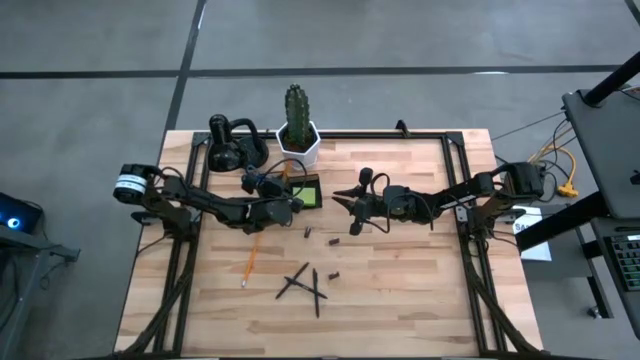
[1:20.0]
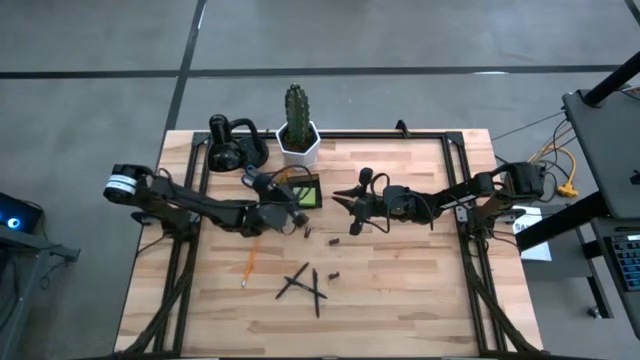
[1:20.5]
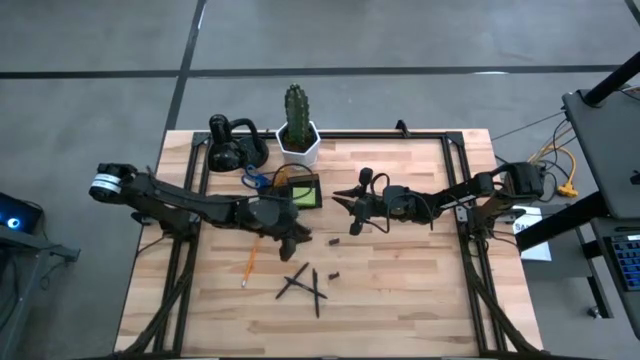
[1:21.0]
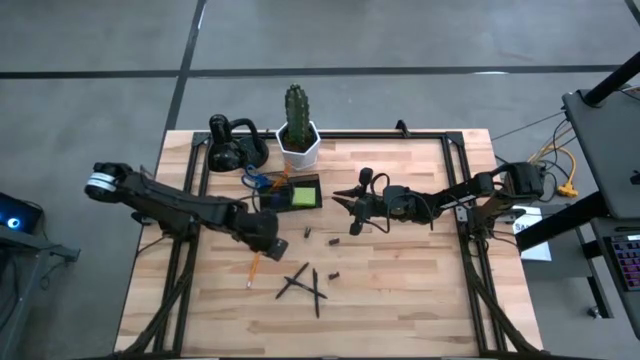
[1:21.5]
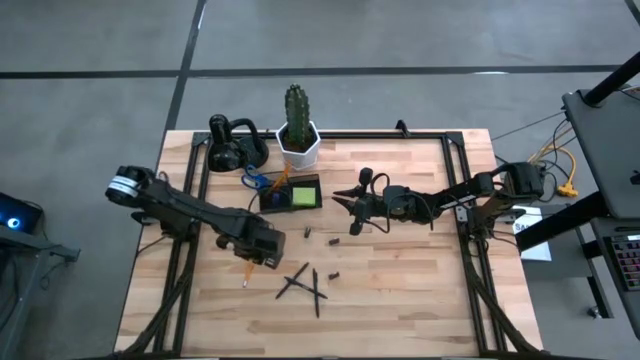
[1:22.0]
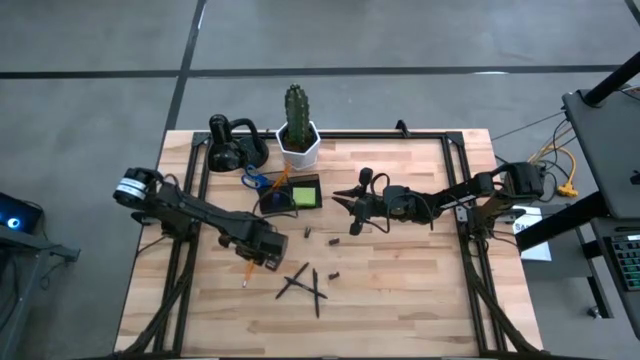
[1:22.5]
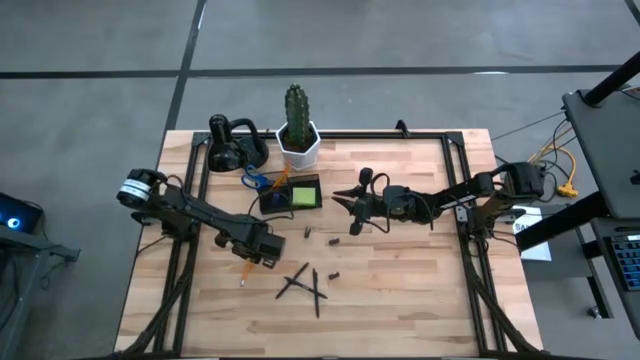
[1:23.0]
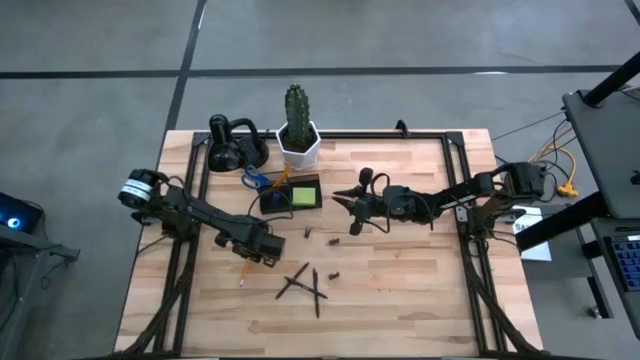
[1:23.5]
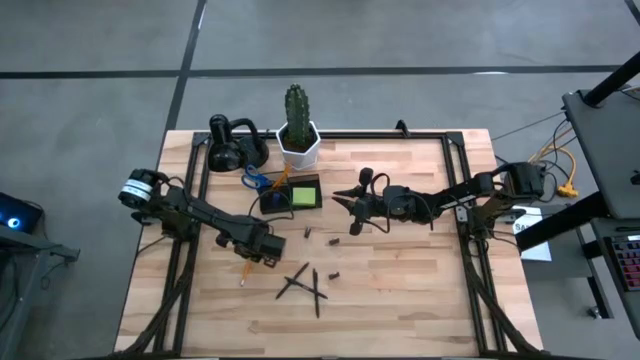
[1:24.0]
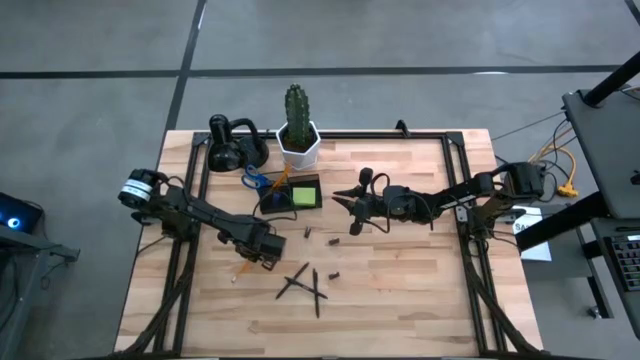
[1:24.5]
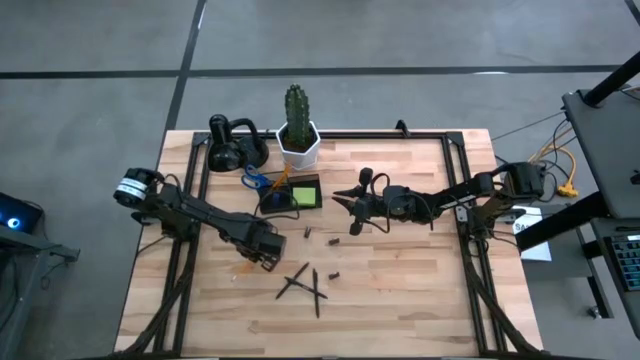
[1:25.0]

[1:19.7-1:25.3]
Task: Pick and place office supplies into organizer
Put the orange pencil into the black desk organizer

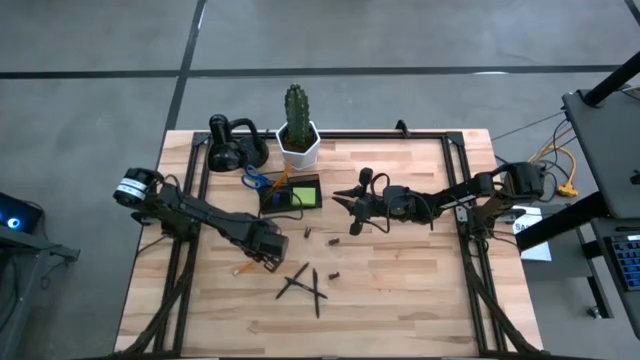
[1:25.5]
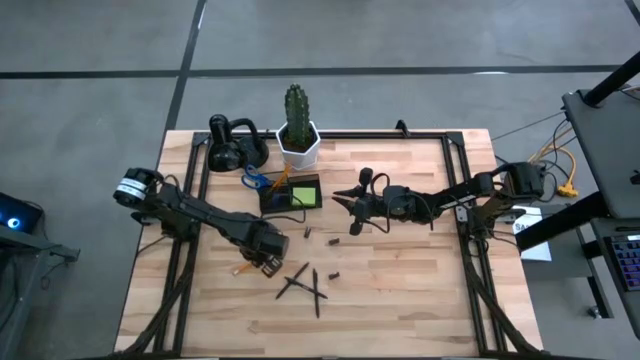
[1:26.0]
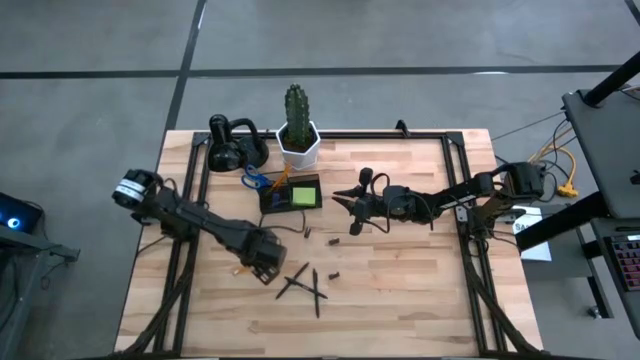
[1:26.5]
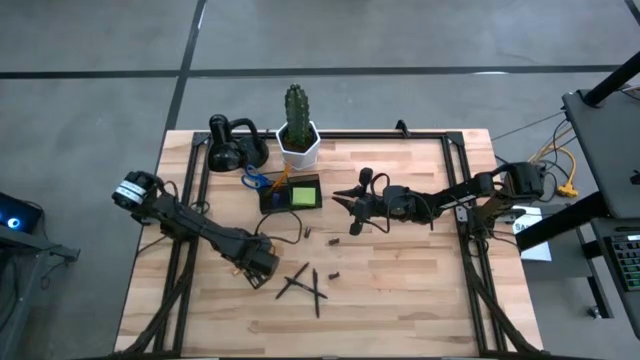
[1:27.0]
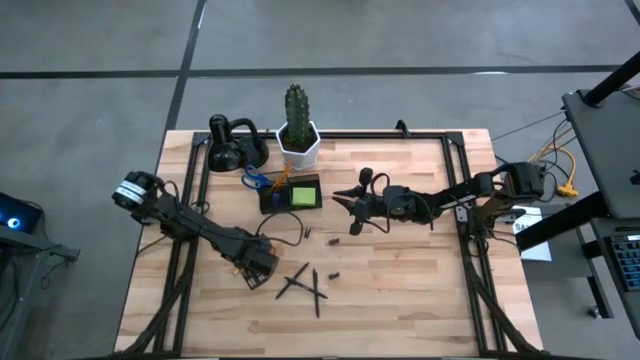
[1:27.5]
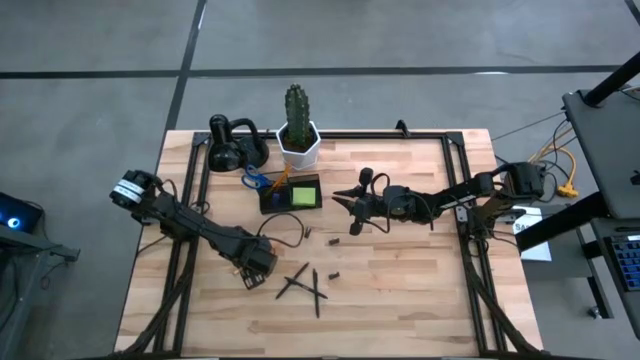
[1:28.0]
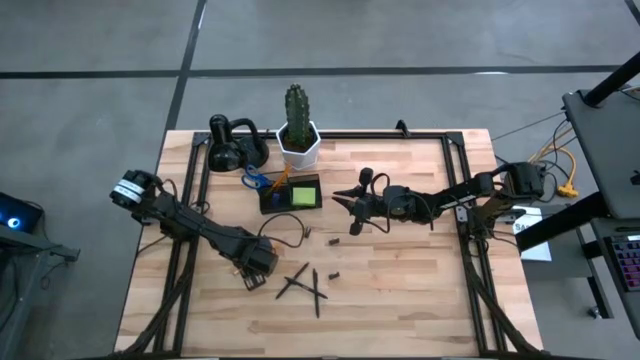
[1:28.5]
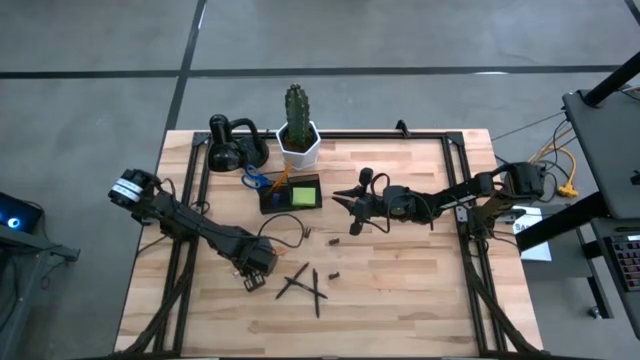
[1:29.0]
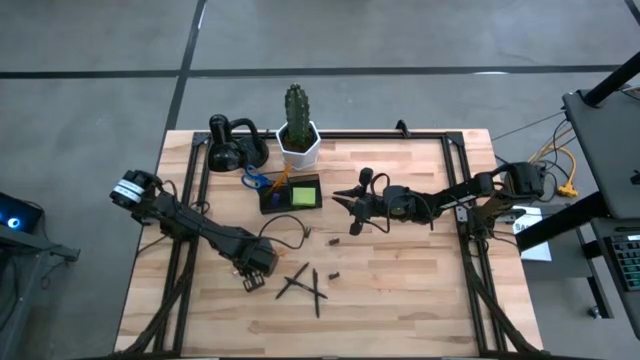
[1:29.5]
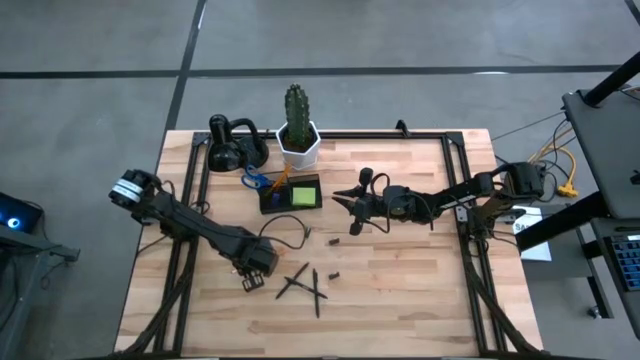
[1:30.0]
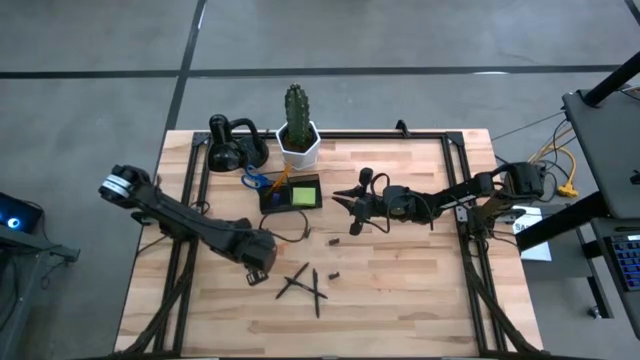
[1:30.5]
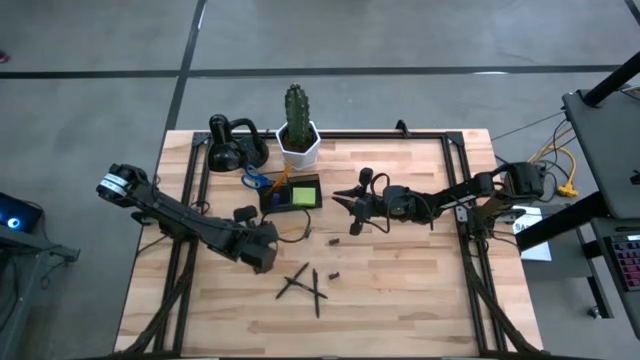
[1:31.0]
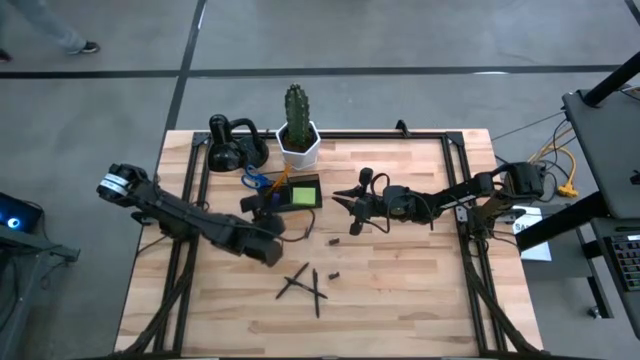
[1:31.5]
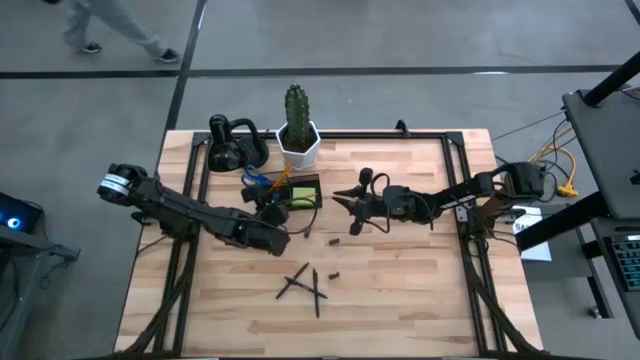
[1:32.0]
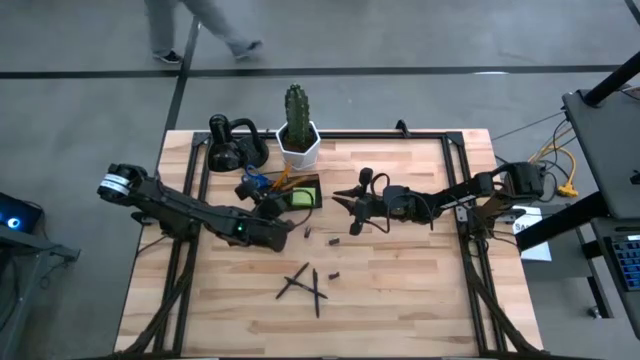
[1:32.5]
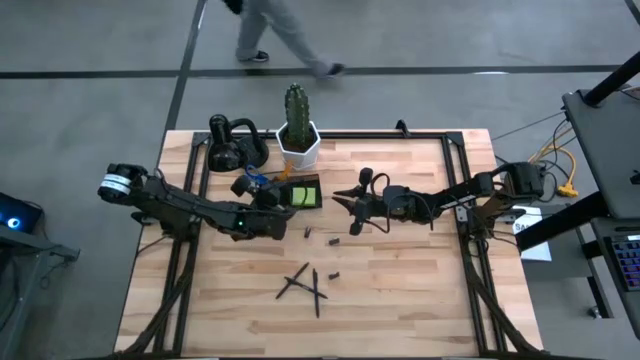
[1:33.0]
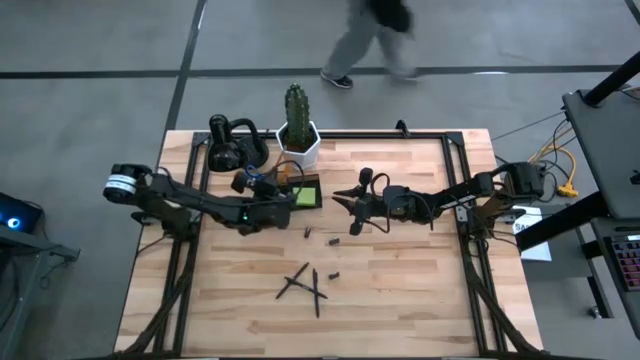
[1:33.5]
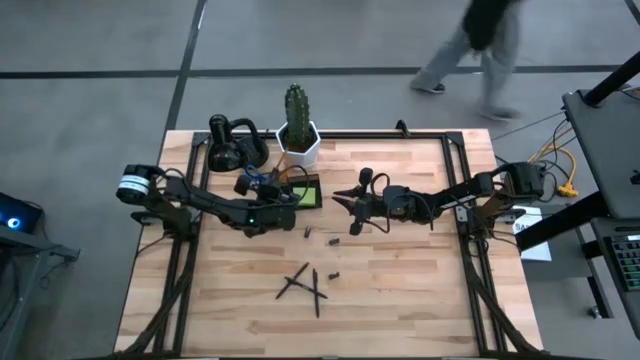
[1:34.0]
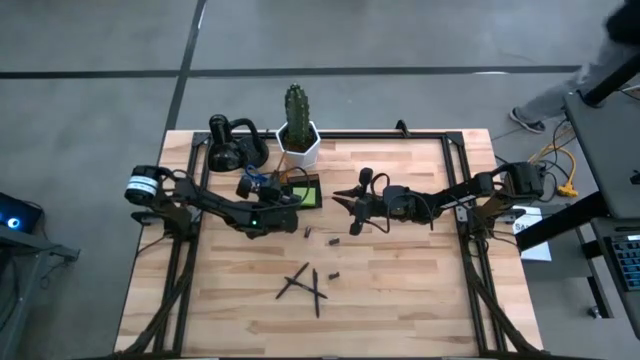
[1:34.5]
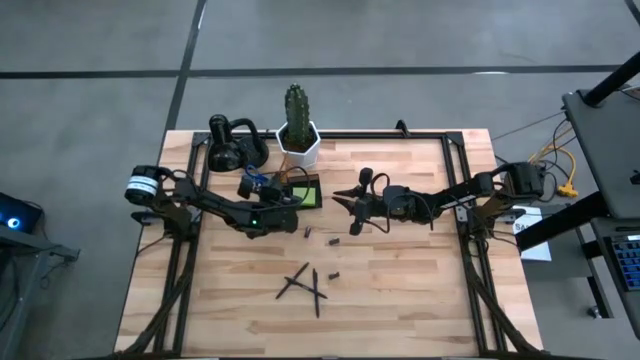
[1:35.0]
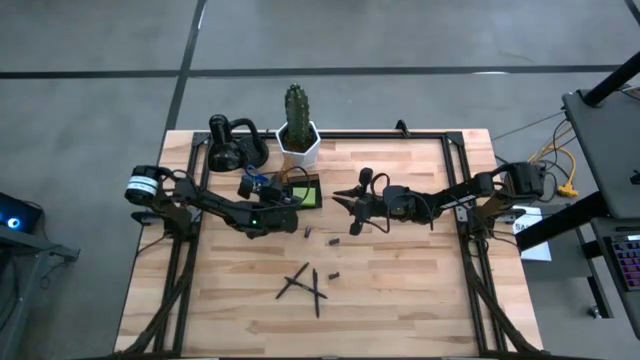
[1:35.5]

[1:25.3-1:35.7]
Put the orange pencil into the black desk organizer

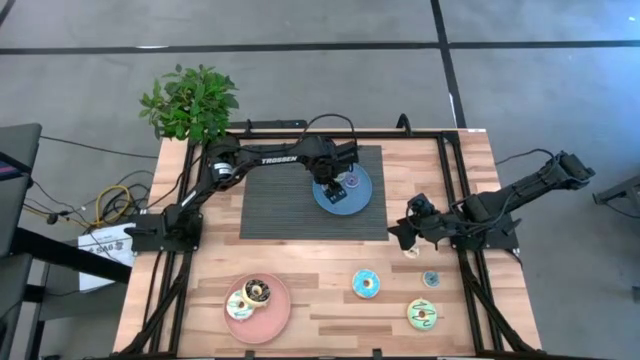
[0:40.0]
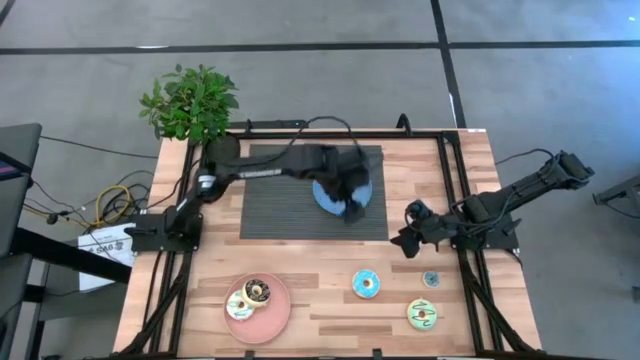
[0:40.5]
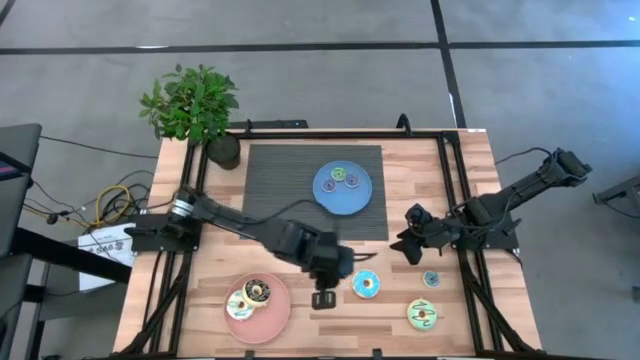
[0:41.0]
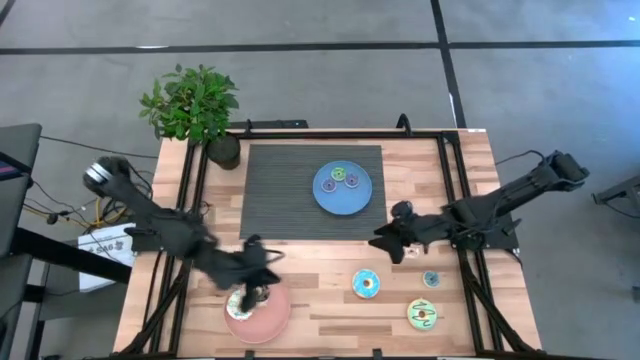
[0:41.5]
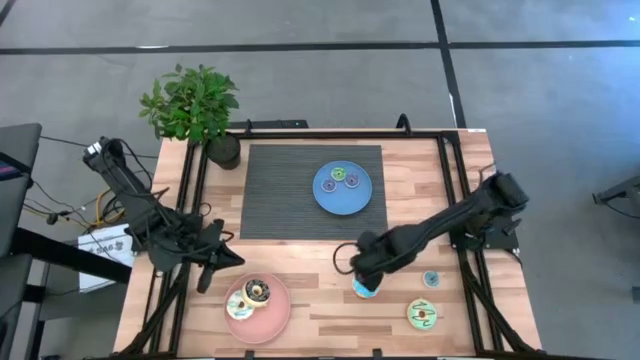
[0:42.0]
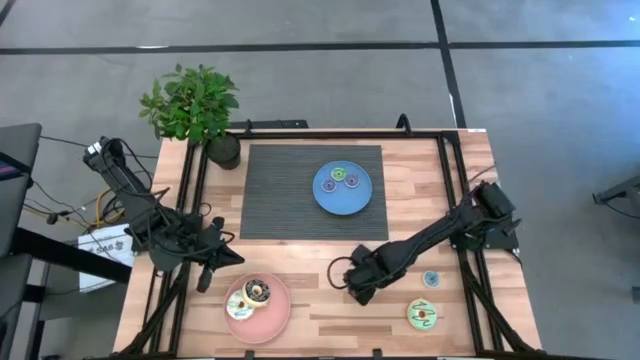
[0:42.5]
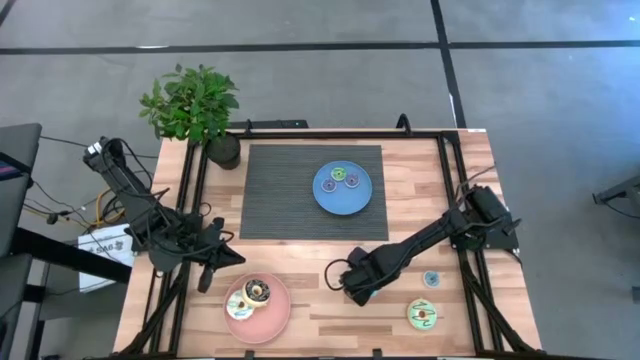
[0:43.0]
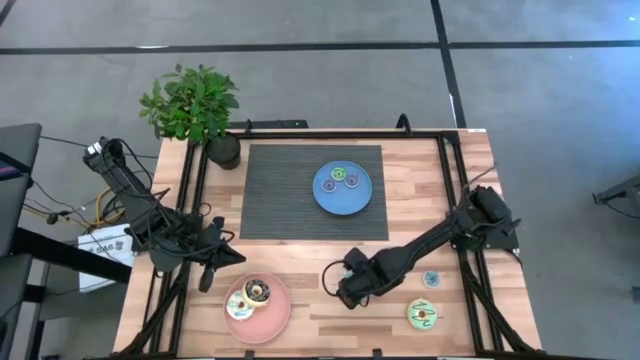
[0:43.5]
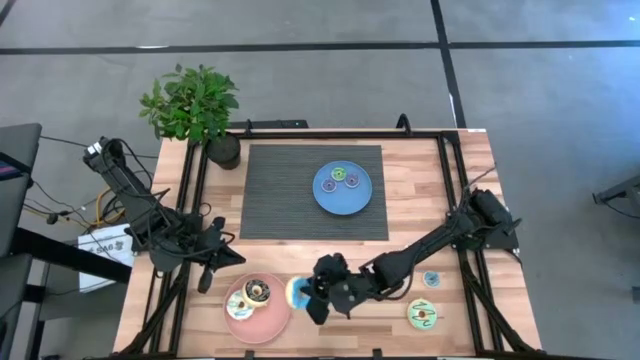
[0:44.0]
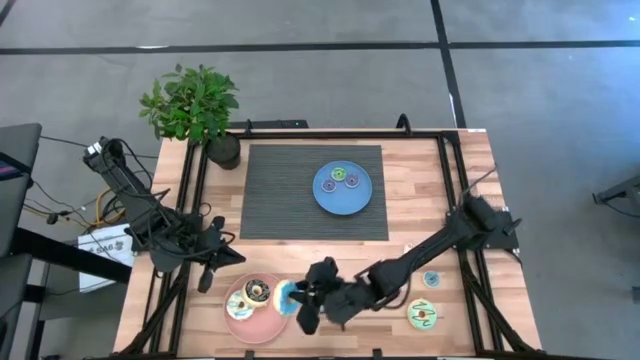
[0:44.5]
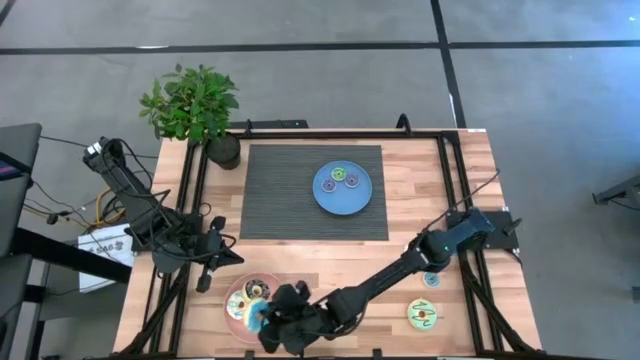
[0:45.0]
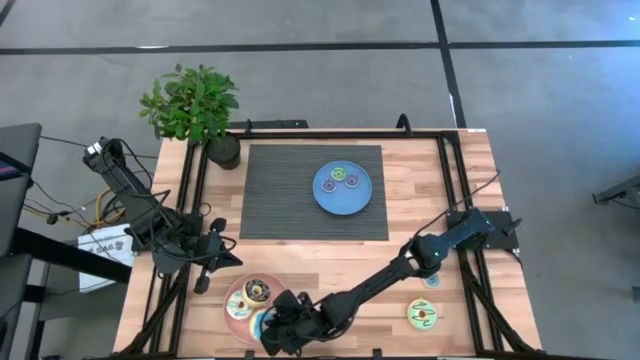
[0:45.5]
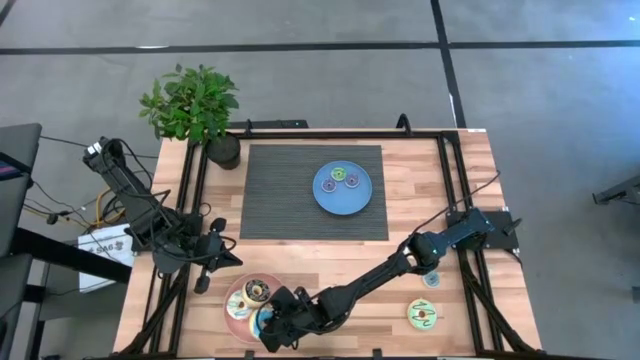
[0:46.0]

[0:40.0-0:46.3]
Task: Pick & Place donuts
Put the big light blue donut on the light orange plate
